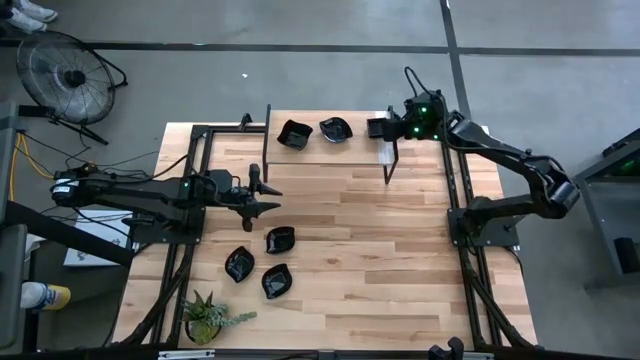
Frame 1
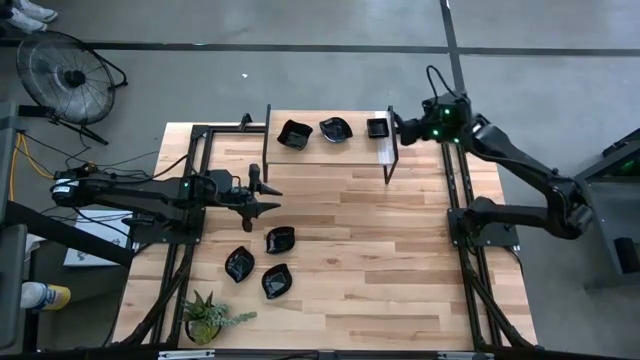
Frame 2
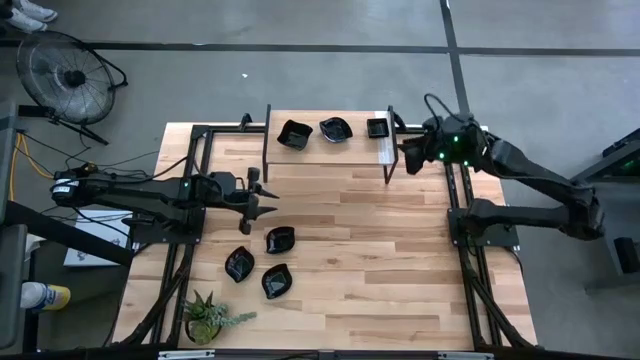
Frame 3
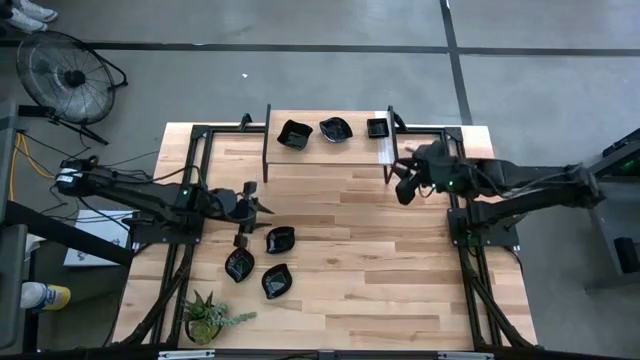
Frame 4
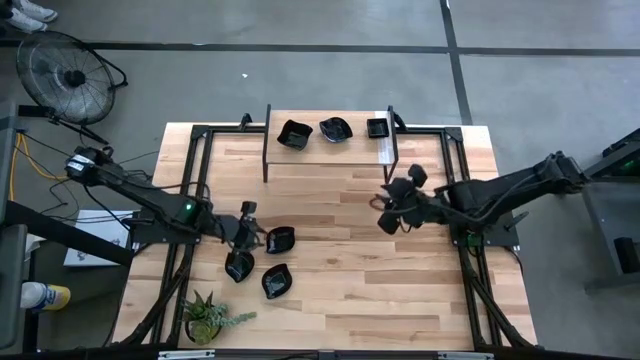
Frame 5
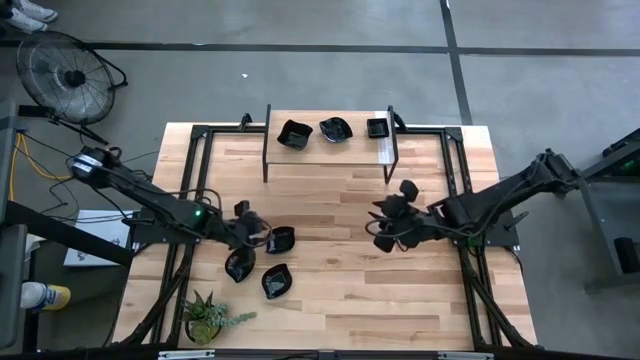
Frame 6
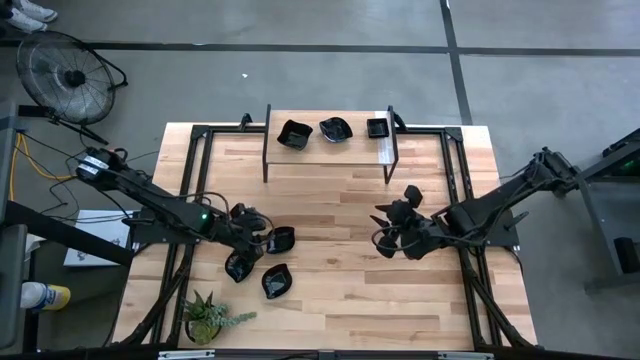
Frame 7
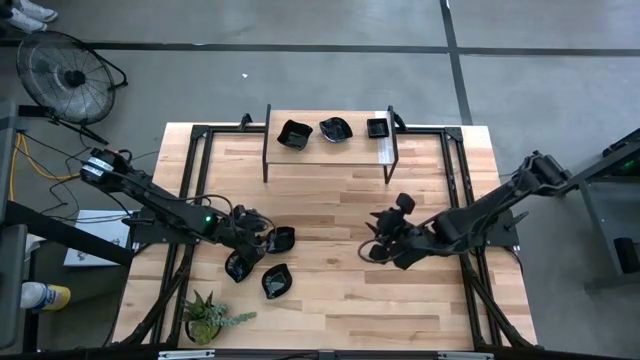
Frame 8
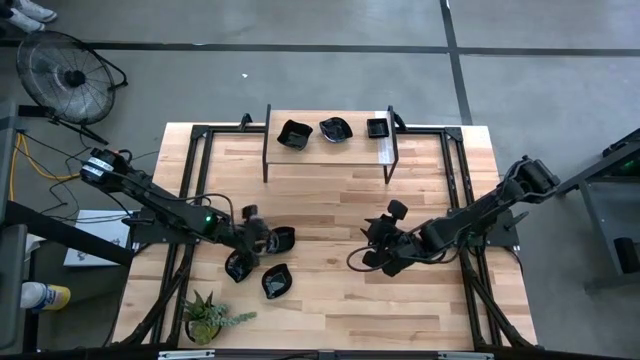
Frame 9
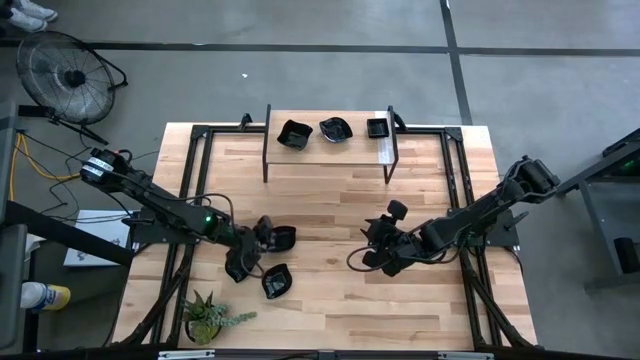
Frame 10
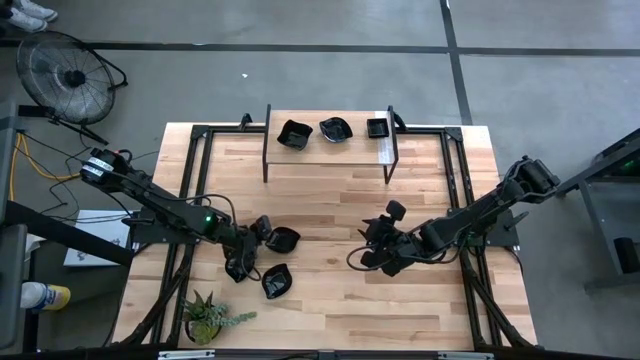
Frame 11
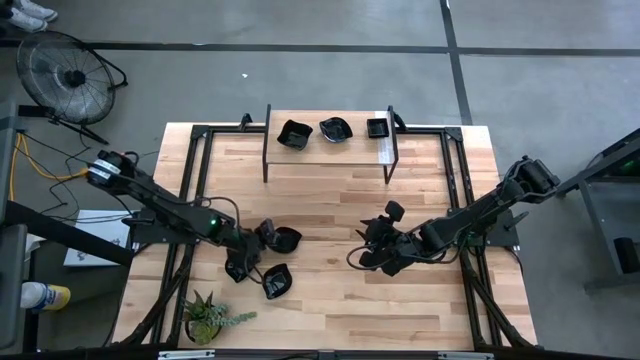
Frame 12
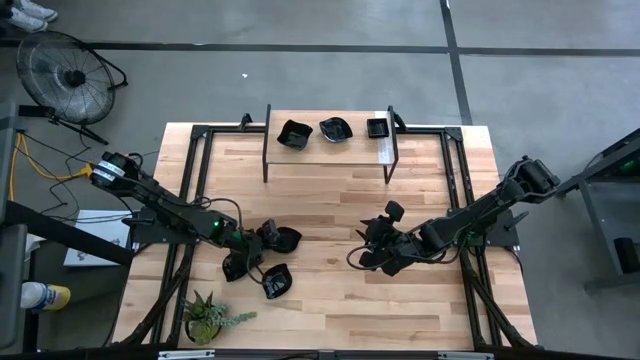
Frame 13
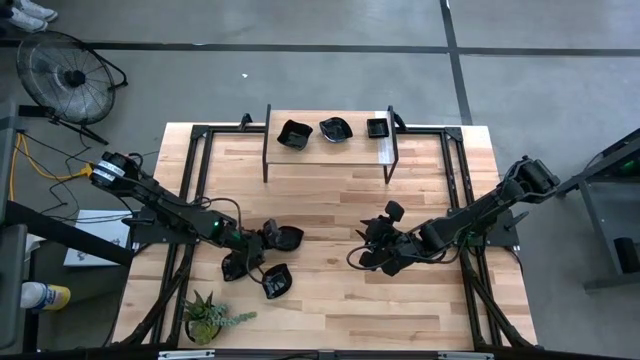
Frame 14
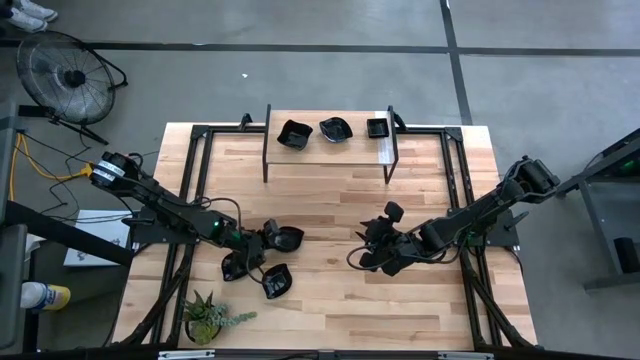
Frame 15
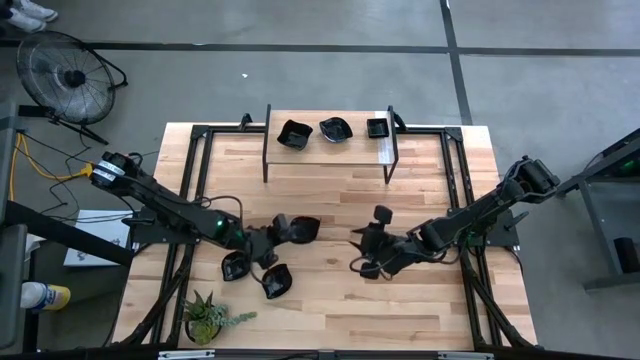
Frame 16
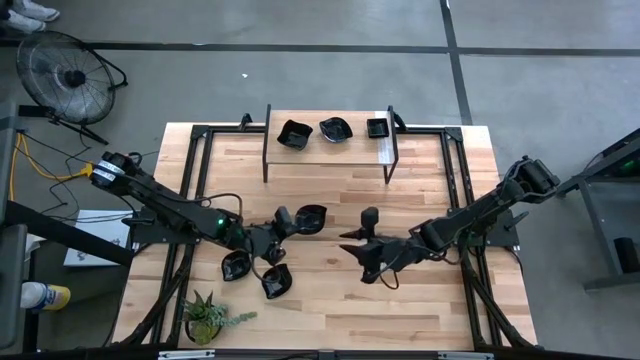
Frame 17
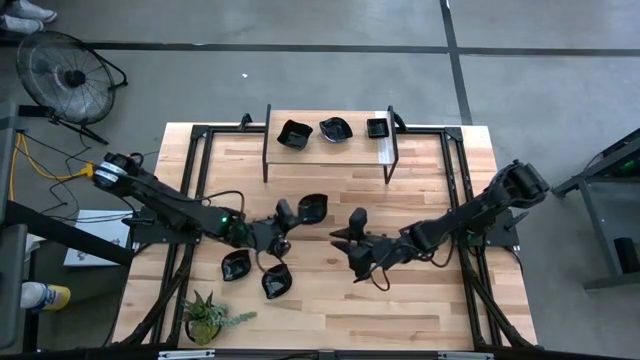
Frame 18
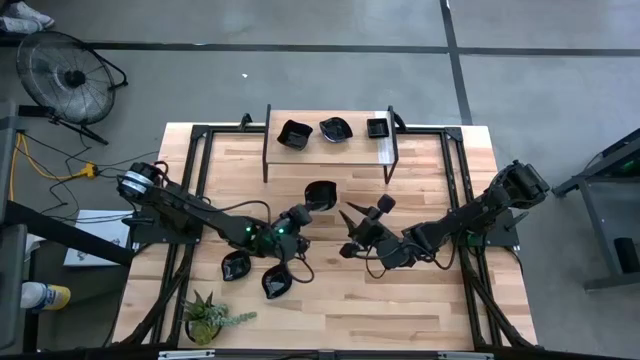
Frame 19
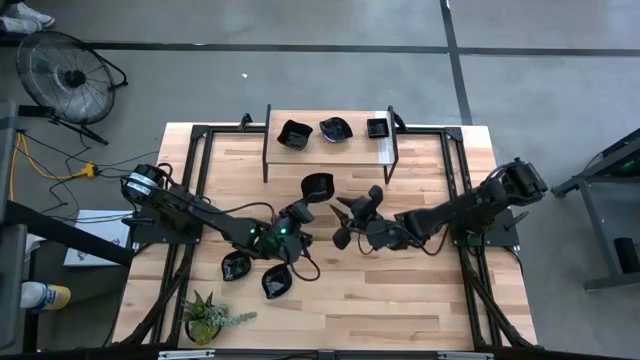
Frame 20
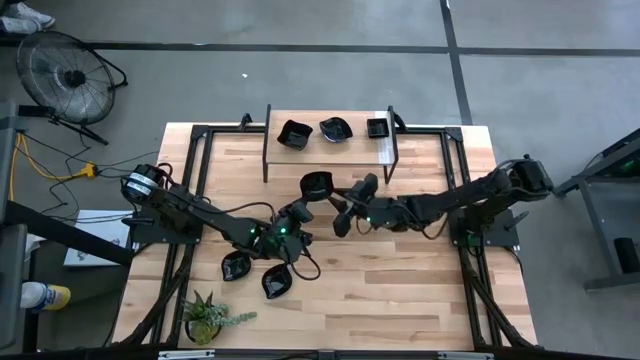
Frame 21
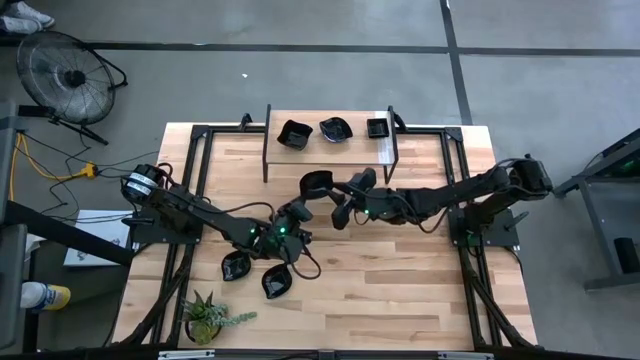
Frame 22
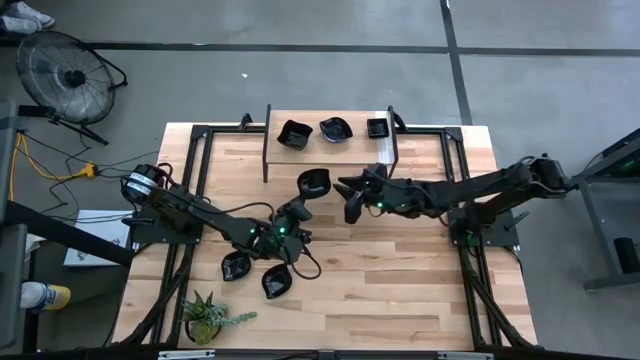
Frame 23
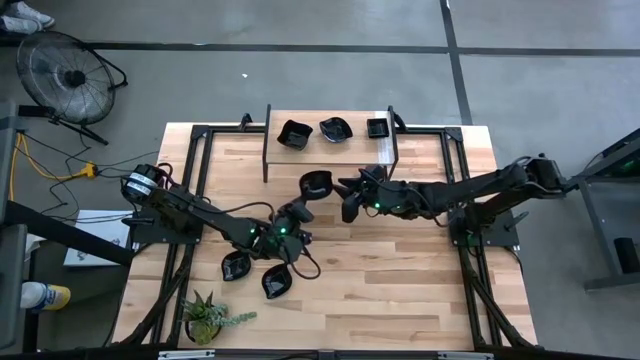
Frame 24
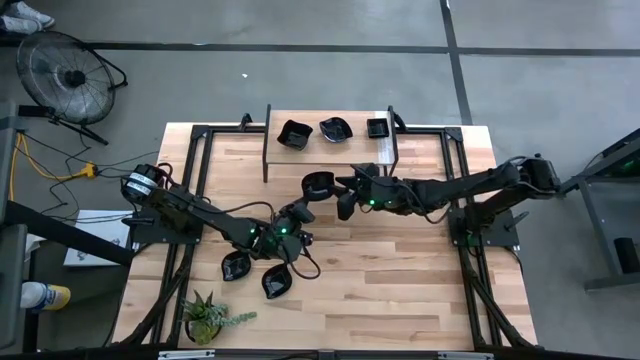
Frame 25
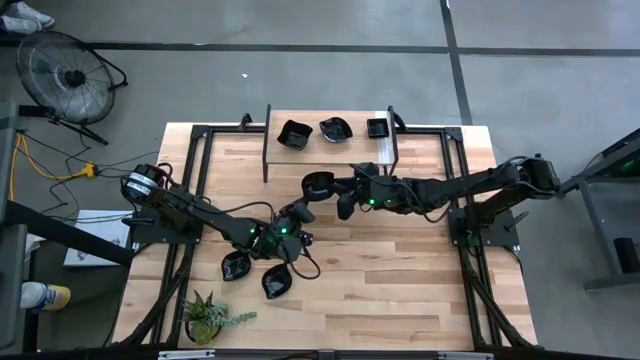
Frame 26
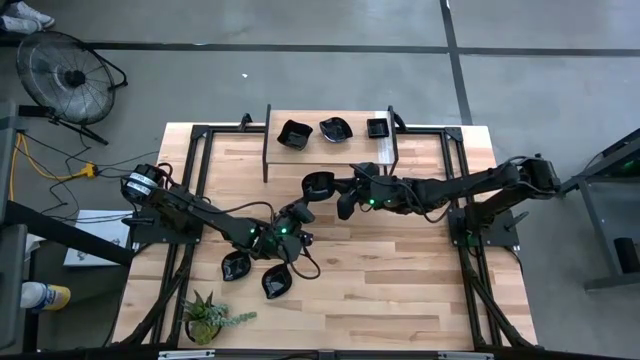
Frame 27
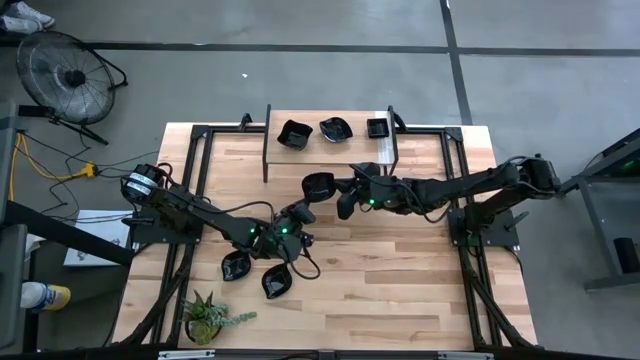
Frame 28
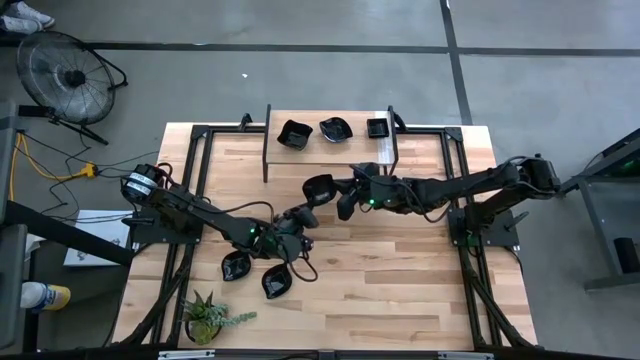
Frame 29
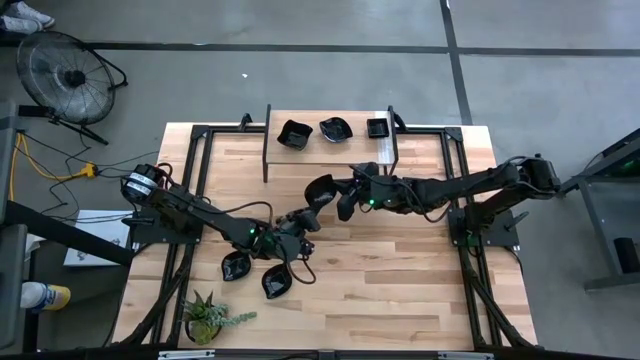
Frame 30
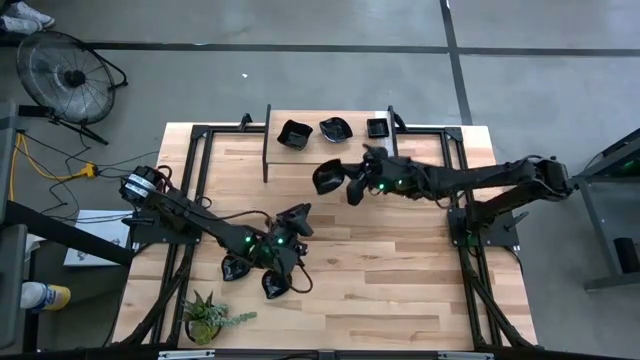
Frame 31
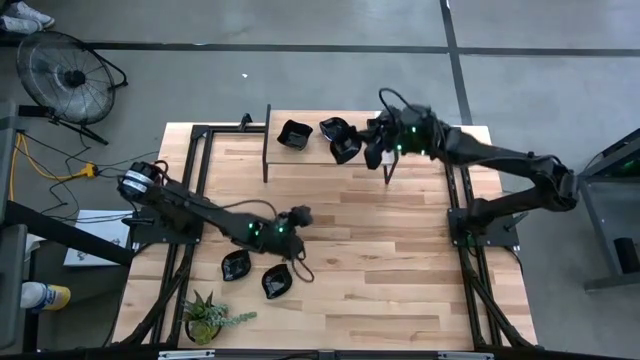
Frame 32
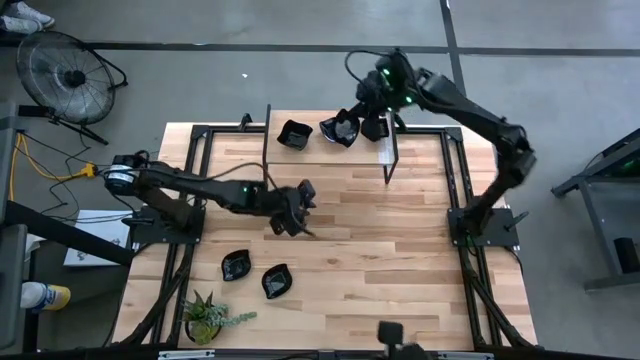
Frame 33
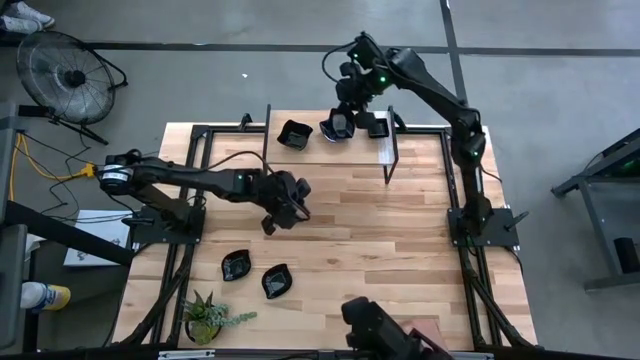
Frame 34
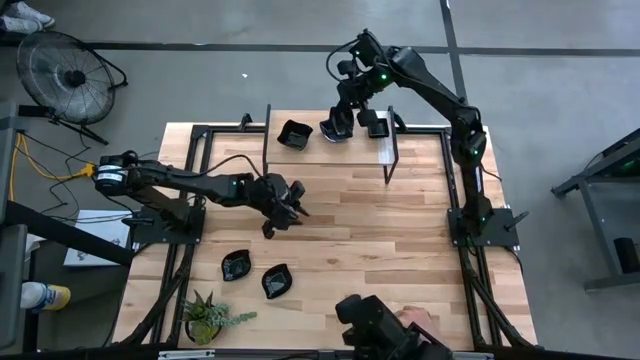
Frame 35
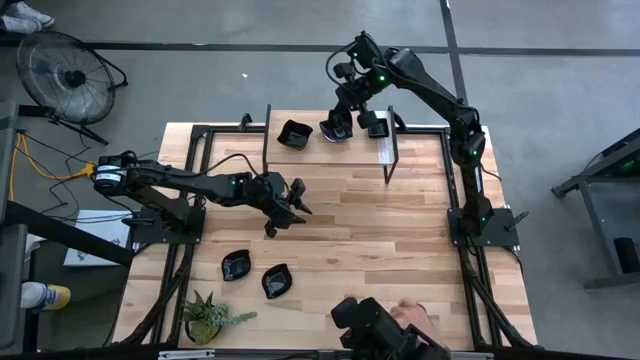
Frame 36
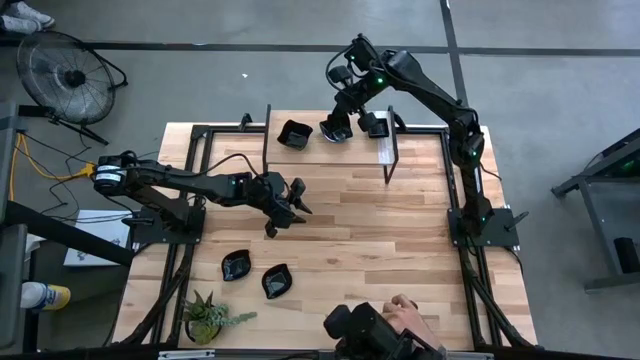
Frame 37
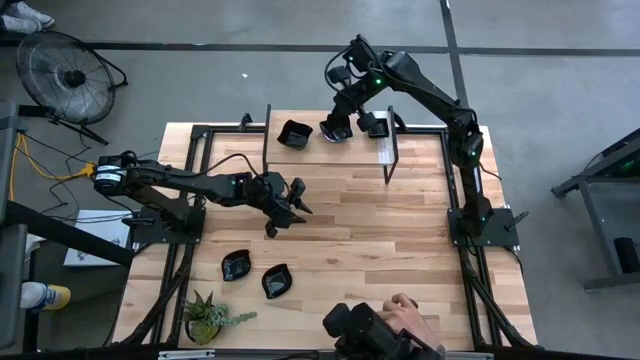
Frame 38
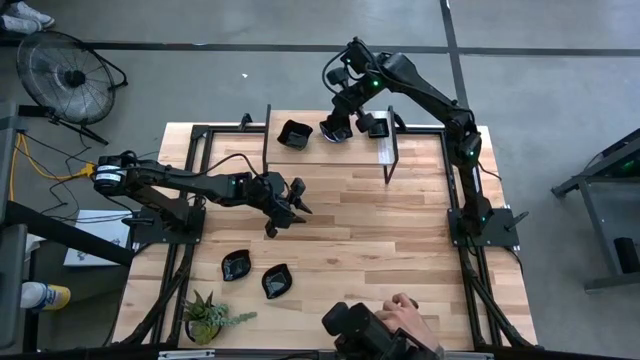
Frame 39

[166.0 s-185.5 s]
Task: Pick & Place Mini shaped plates
Stack the black leaf shaped plate on top of the black leaf shaped plate on the shelf

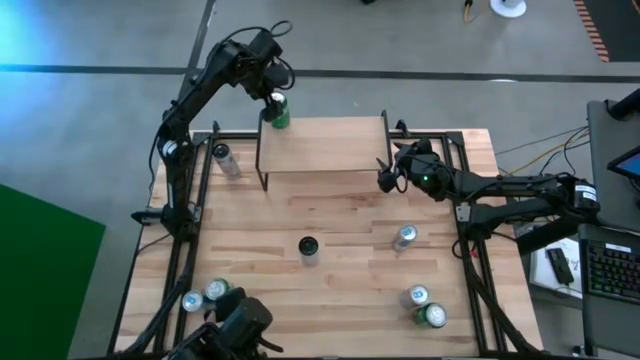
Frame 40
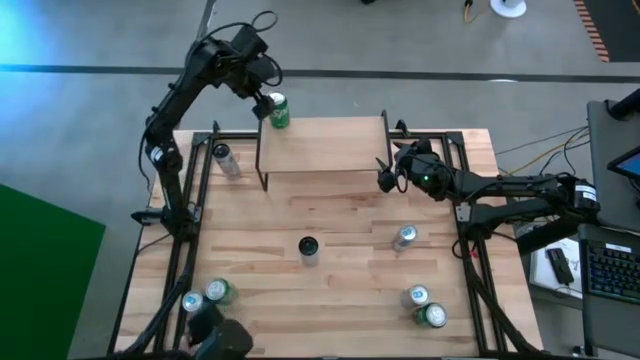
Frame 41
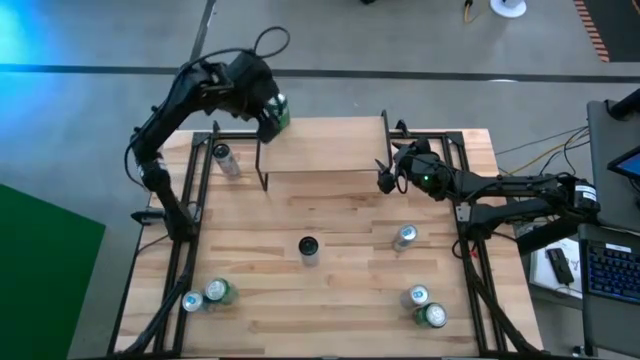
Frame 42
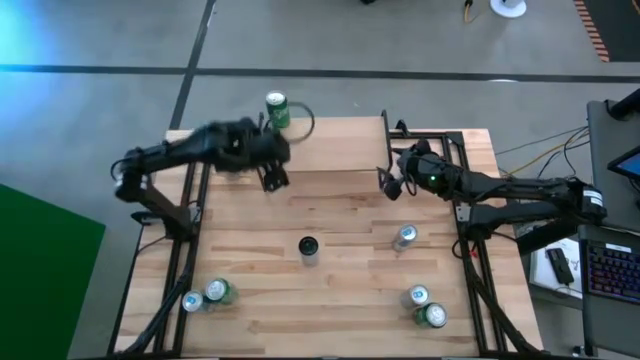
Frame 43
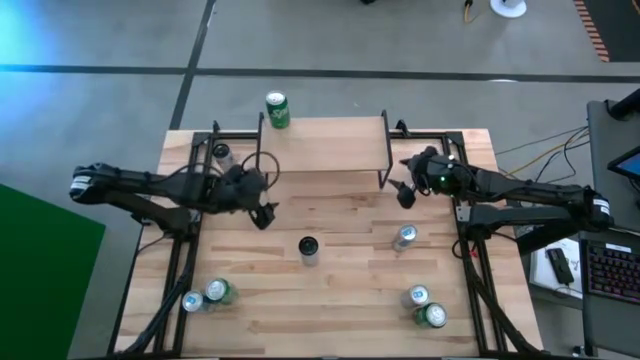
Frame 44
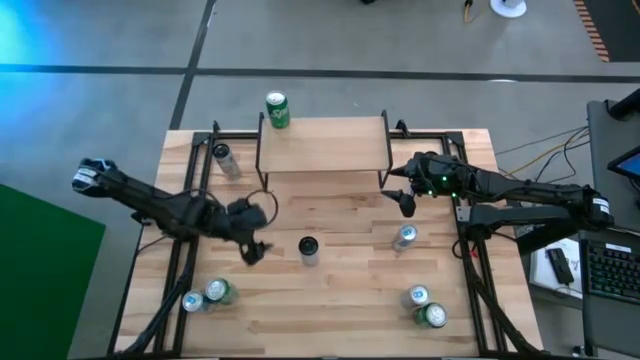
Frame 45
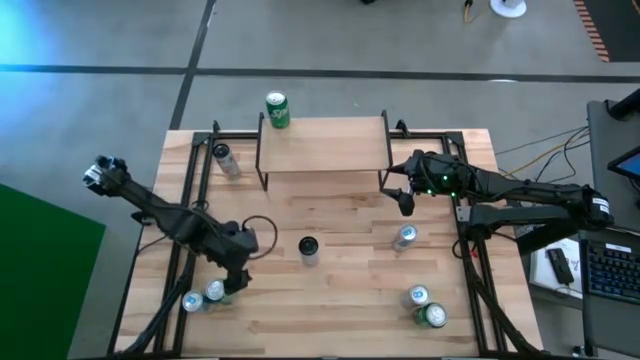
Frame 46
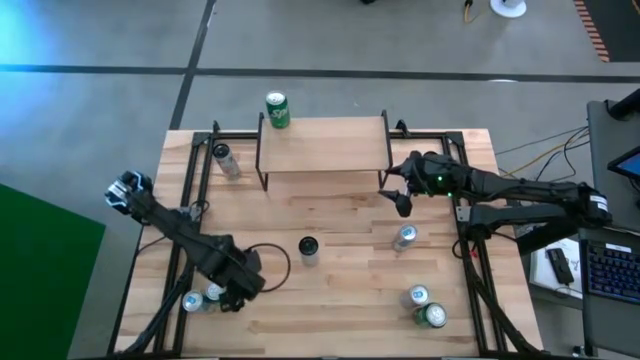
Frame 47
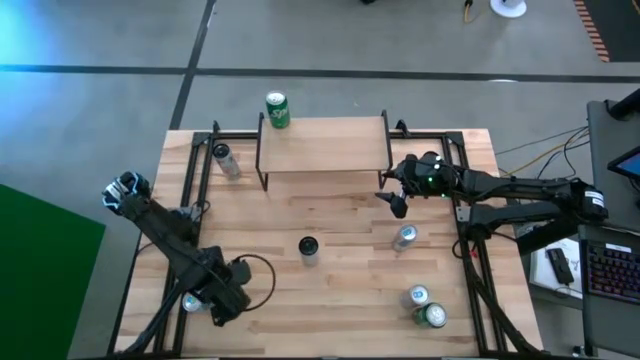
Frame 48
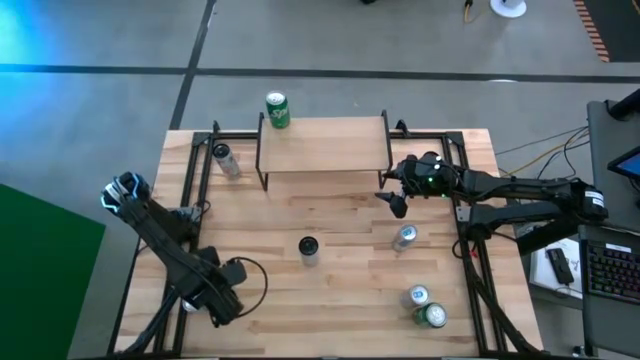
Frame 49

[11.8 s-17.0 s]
Task: Place canned beverage on shelf
Put the left green soda can on the shelf aligned with other green soda cans
